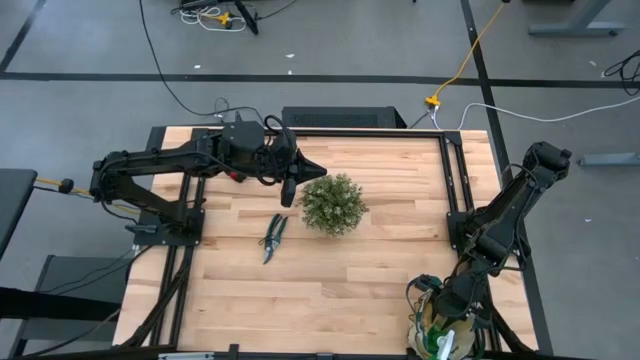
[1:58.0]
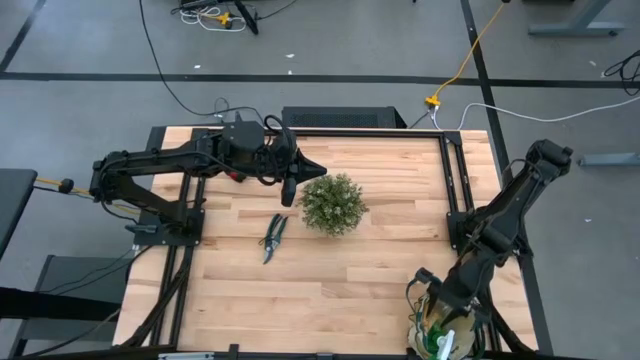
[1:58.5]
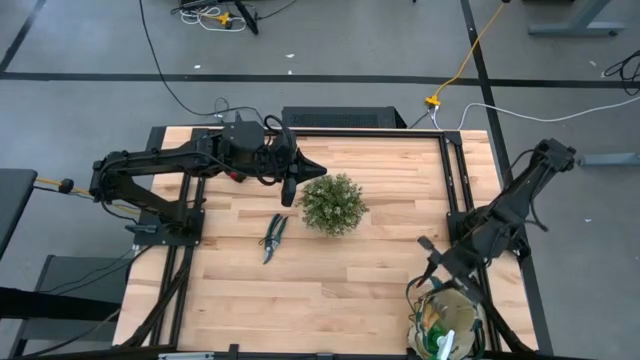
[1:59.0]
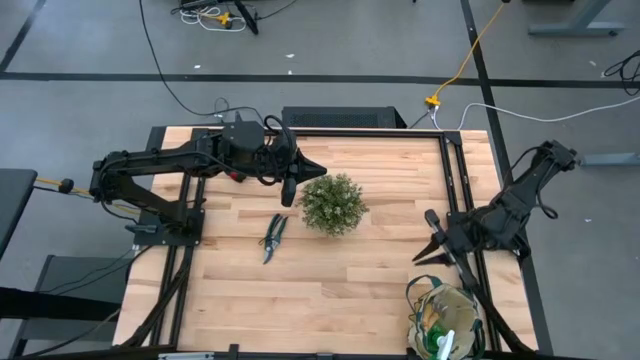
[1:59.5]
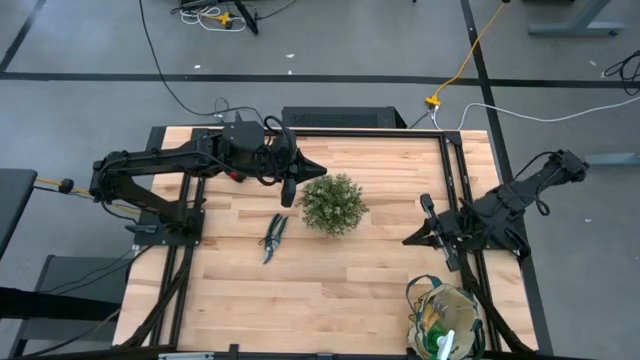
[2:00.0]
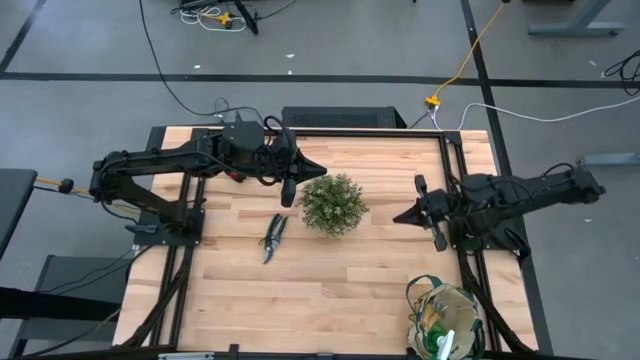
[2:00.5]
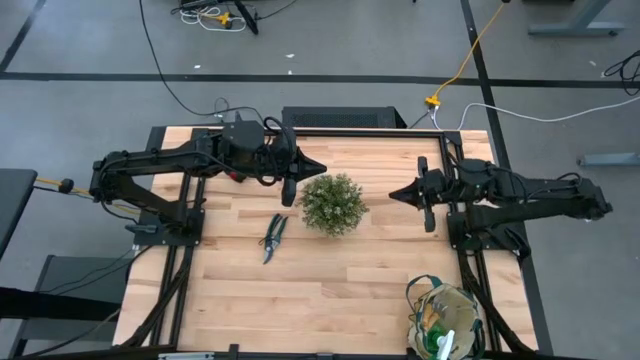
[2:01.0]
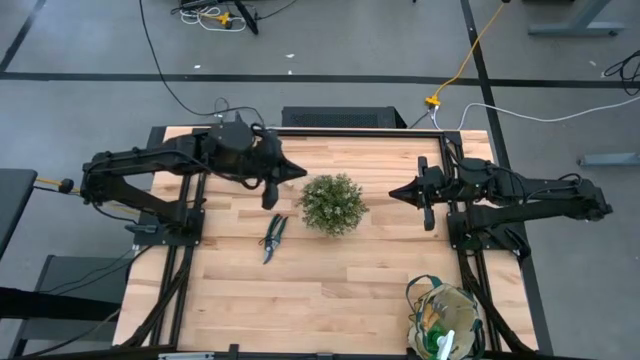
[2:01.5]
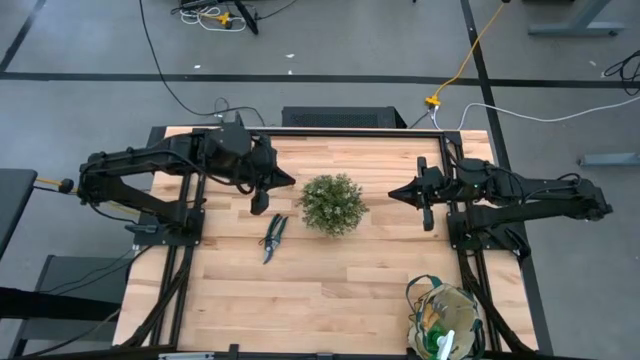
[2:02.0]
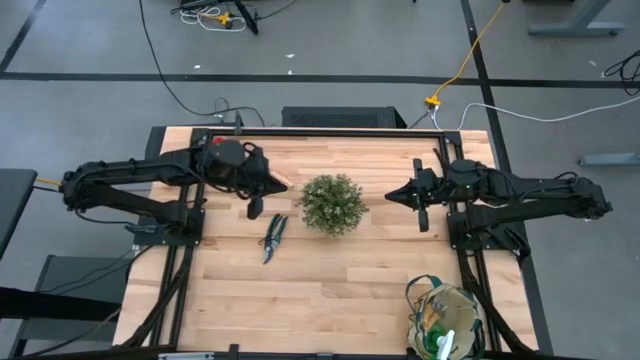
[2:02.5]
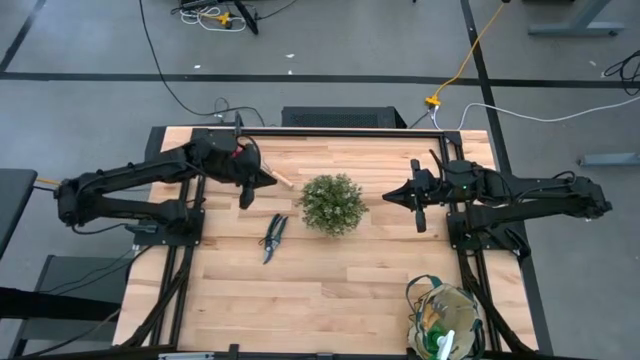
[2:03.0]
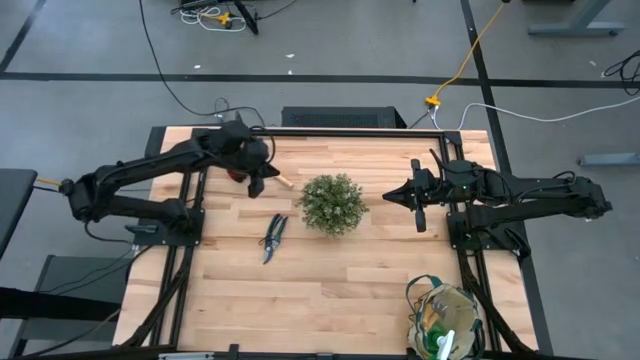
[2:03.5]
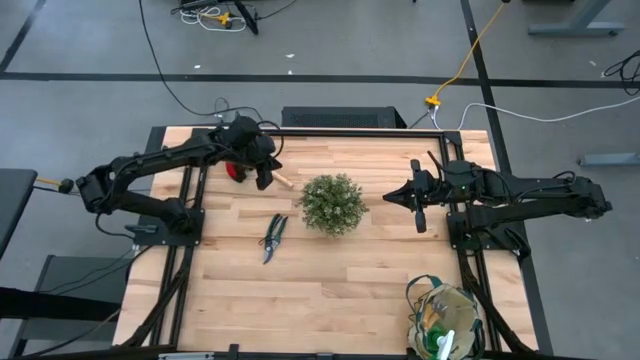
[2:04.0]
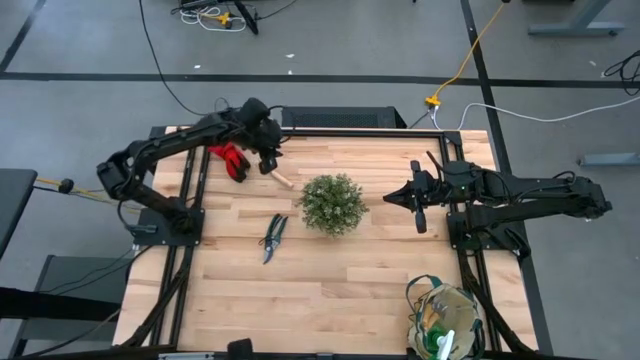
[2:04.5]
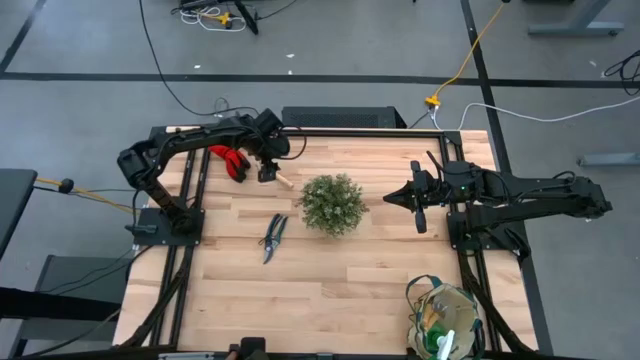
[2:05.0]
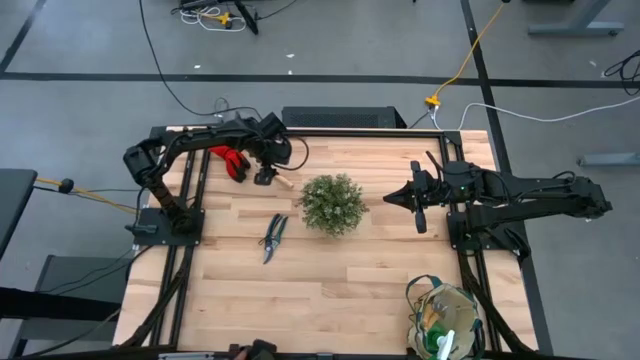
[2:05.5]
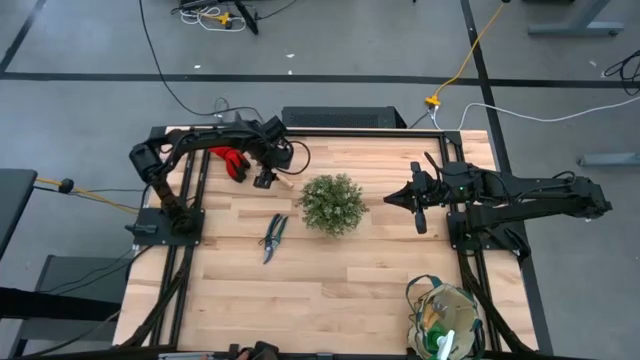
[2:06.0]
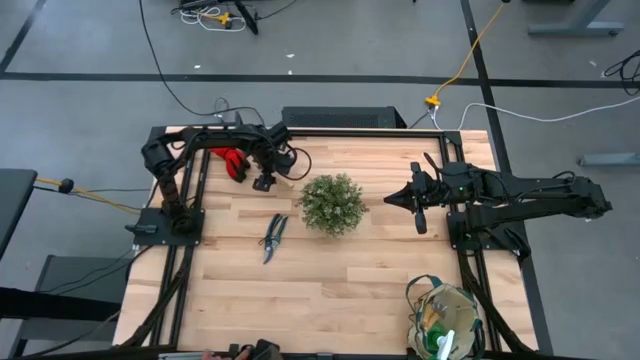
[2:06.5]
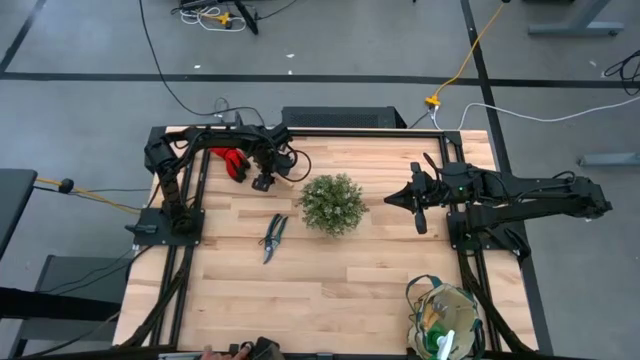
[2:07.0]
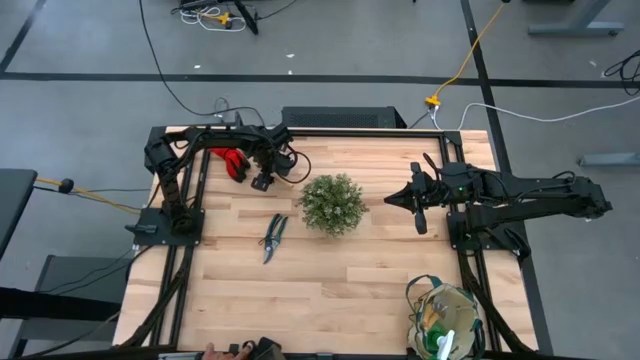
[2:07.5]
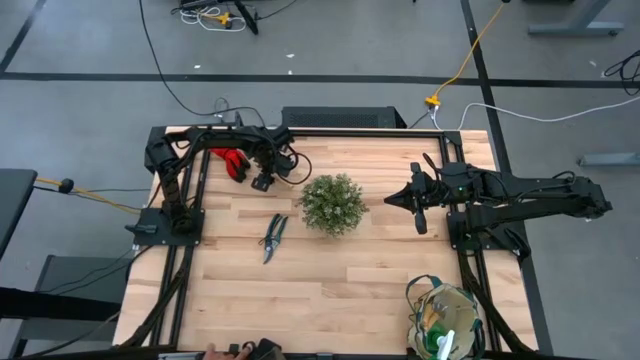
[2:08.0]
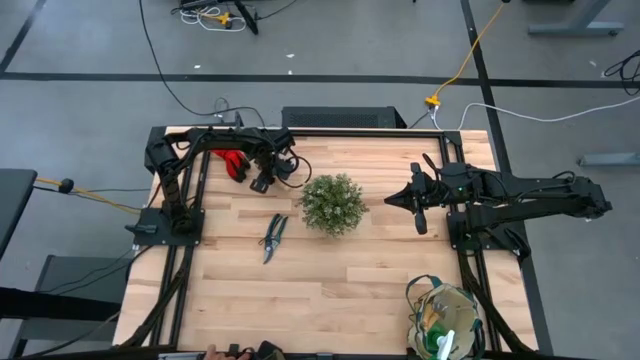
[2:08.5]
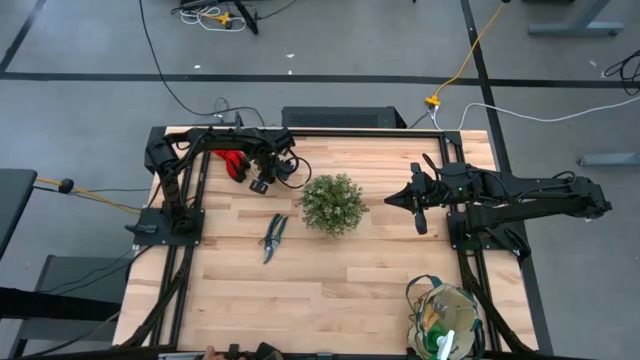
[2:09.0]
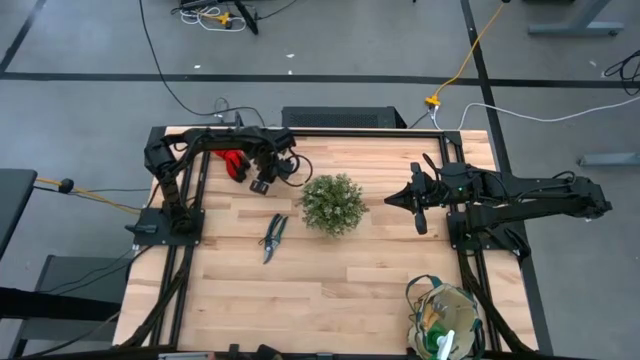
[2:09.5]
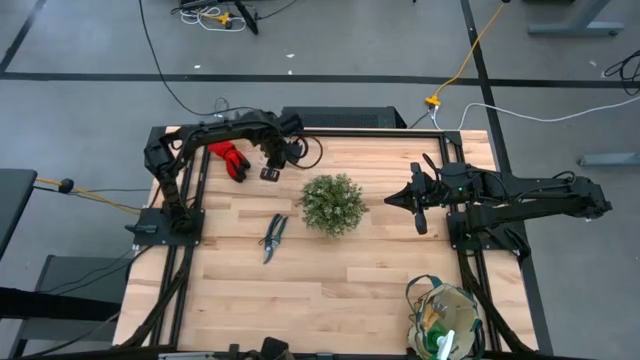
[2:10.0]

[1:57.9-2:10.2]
Task: Pick & Place Garden tools in Gardening bag
Put the brown hand rake into the white gardening bag

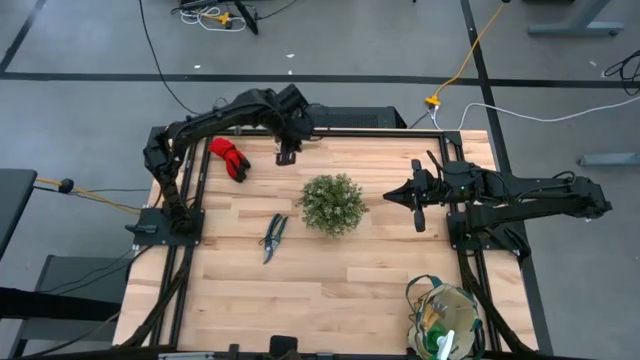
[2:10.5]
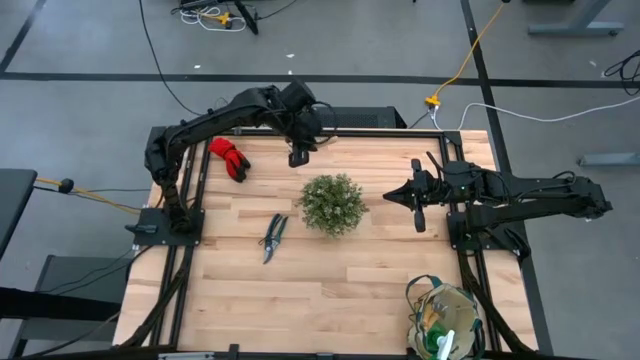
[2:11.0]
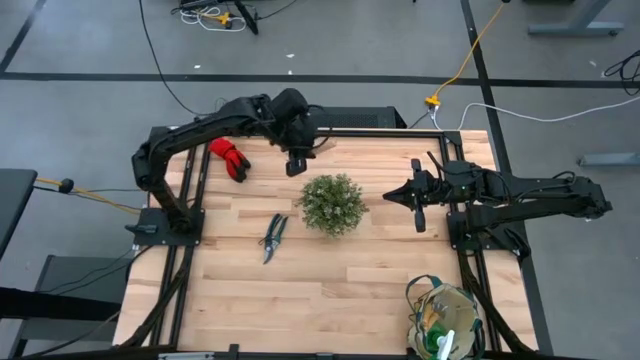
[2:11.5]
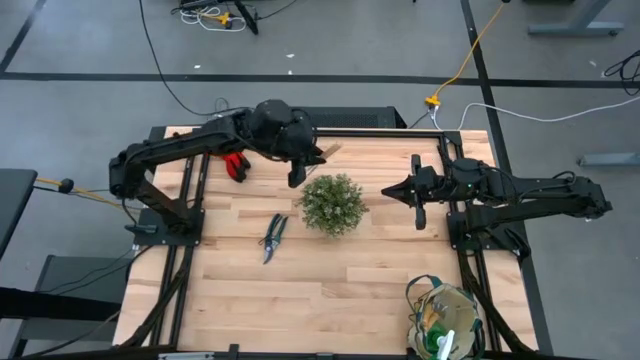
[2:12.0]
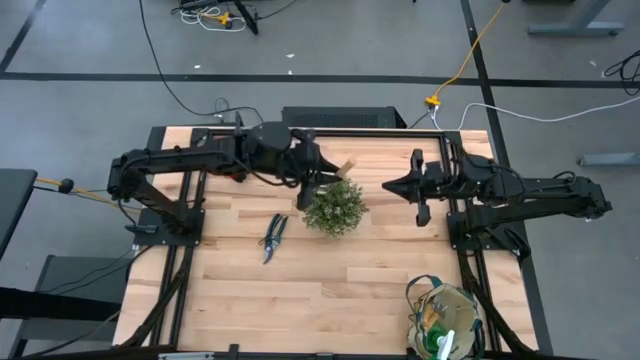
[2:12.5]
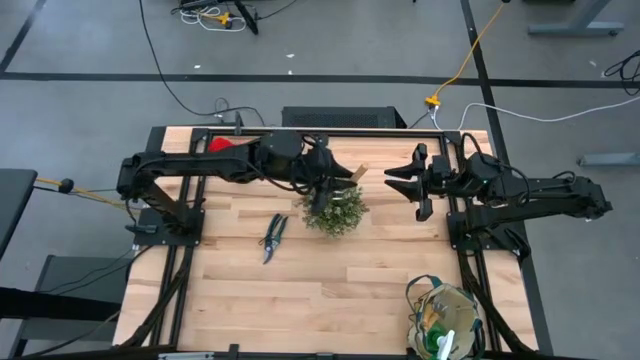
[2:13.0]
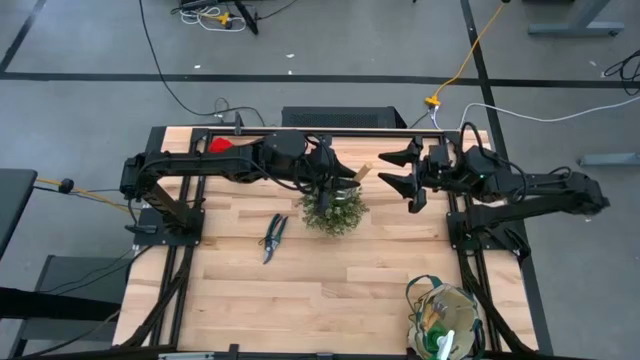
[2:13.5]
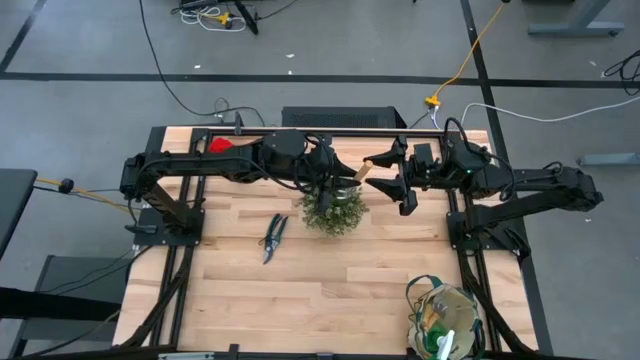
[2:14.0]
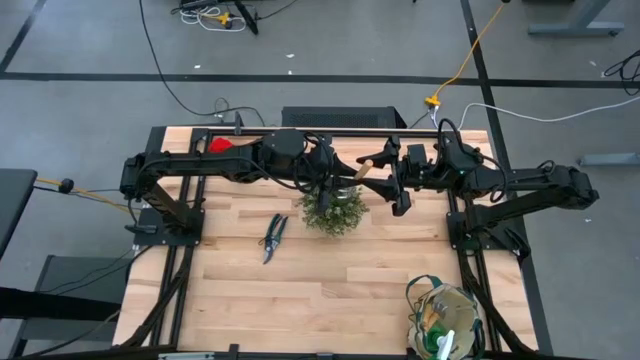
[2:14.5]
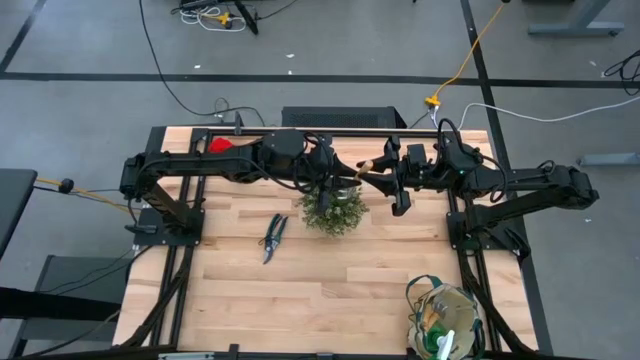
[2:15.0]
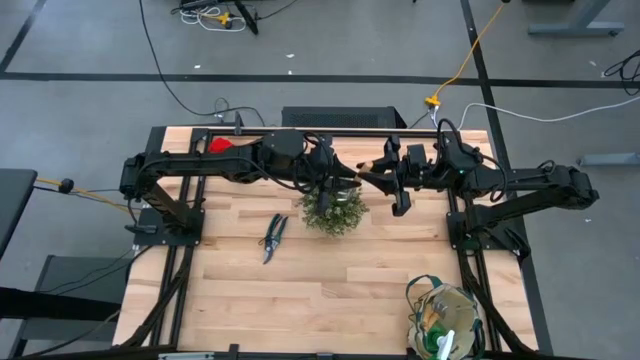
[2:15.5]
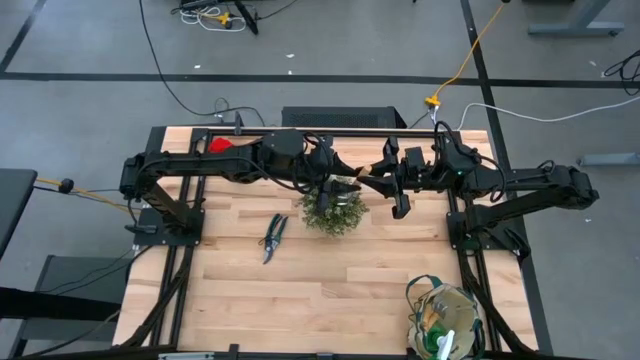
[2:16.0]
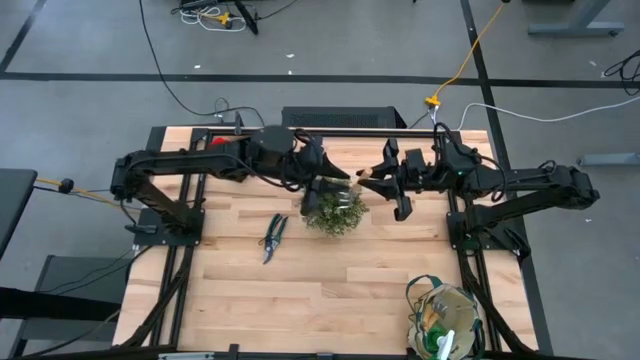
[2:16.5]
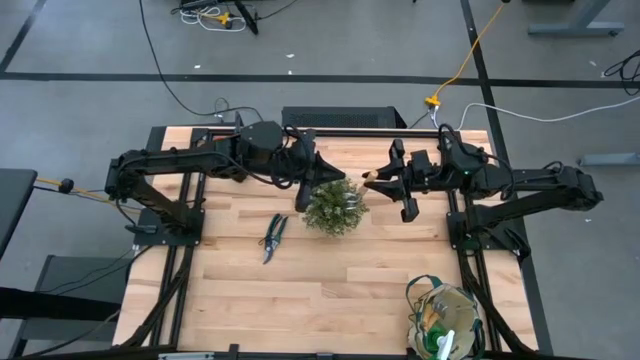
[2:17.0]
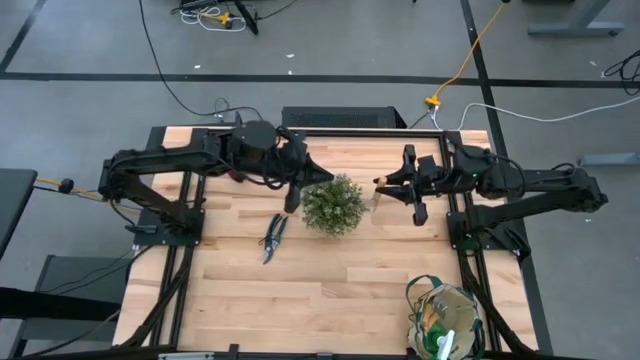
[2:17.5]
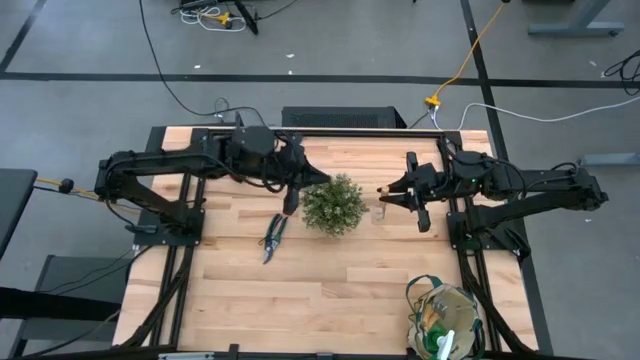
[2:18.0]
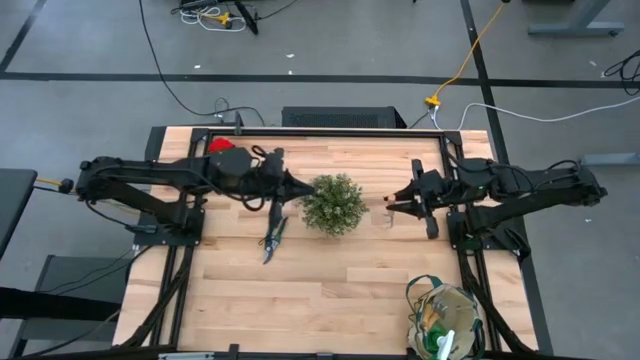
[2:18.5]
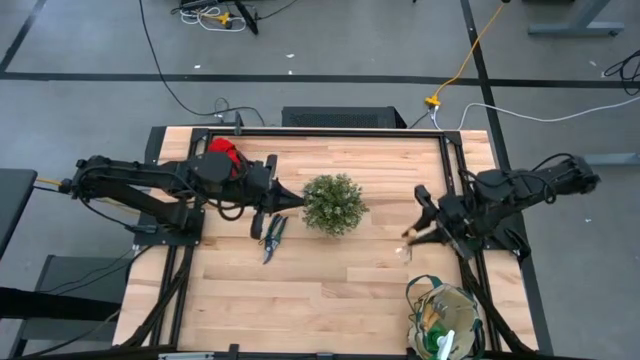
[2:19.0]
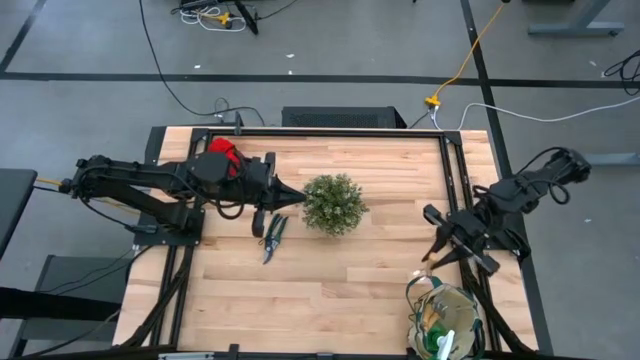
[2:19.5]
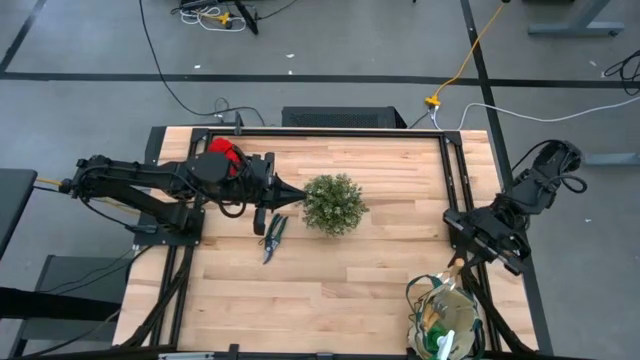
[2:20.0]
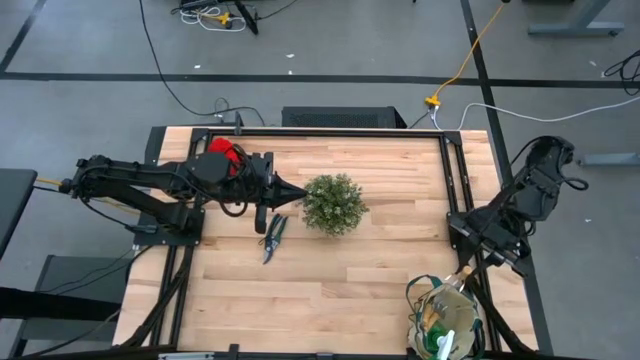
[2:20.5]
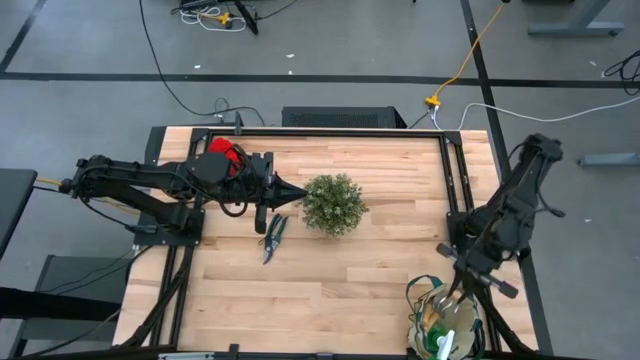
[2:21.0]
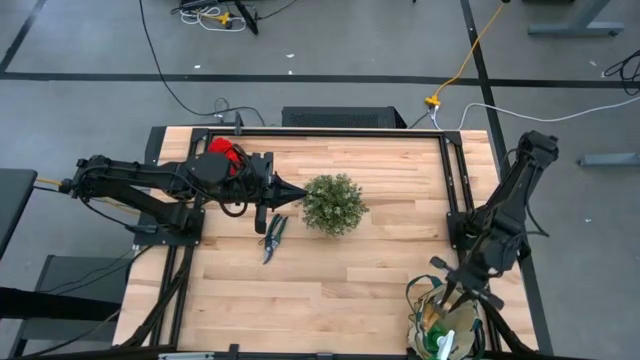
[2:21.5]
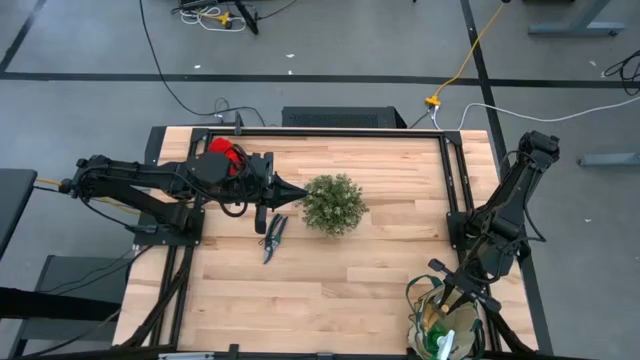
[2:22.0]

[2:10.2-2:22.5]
Put the brown hand rake into the white gardening bag
